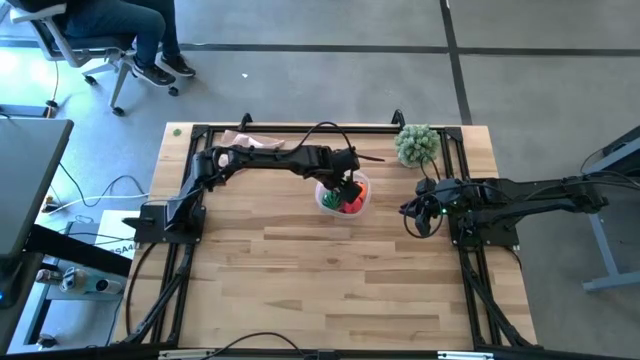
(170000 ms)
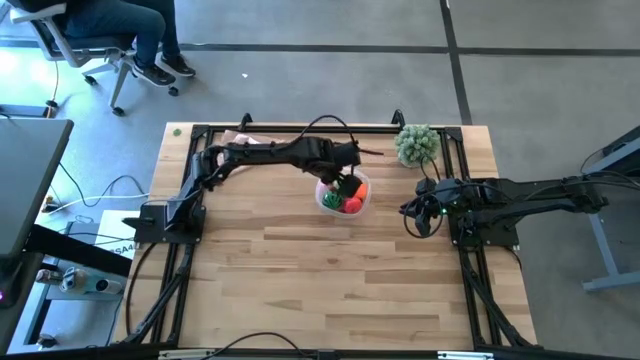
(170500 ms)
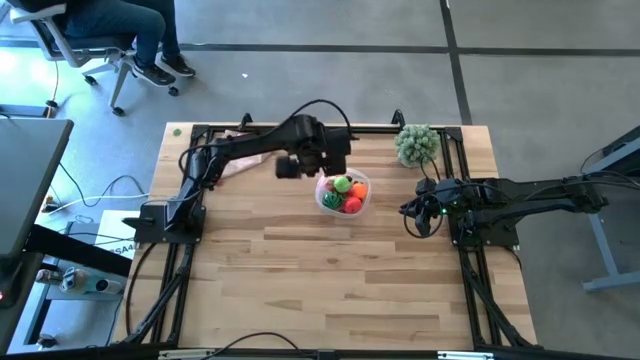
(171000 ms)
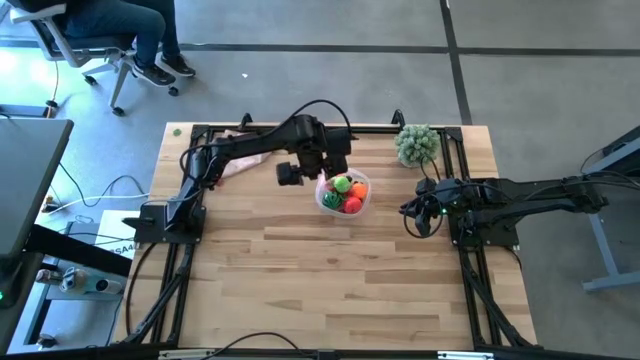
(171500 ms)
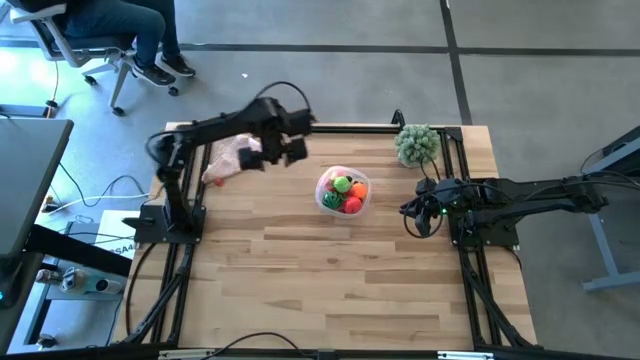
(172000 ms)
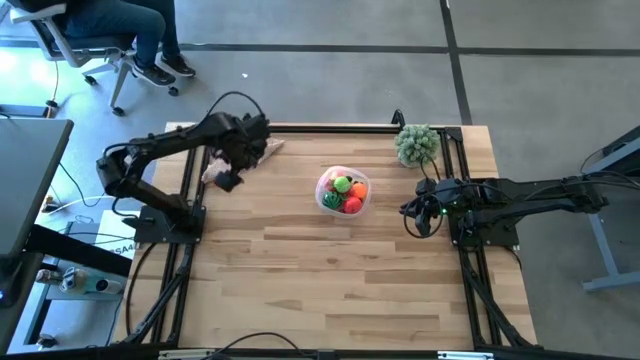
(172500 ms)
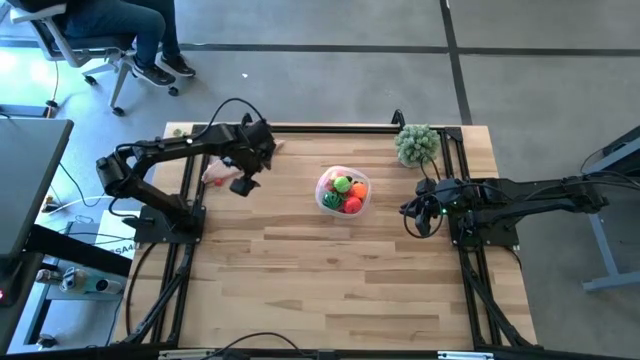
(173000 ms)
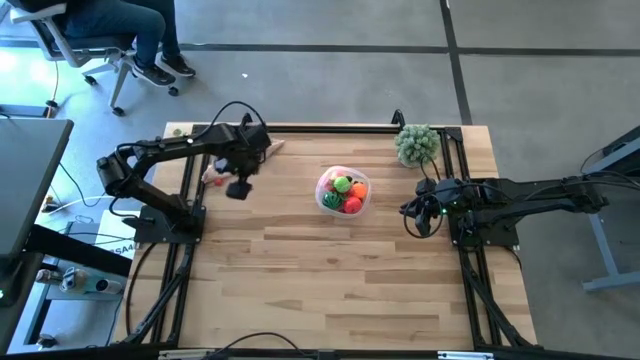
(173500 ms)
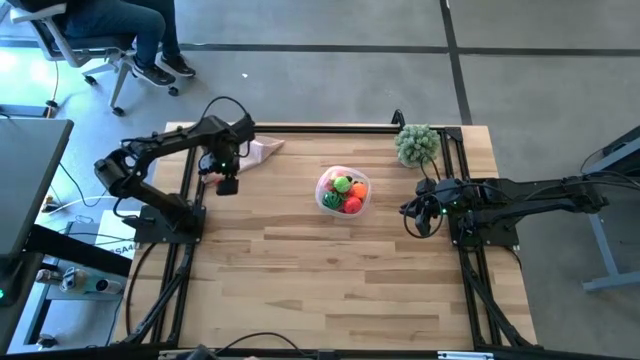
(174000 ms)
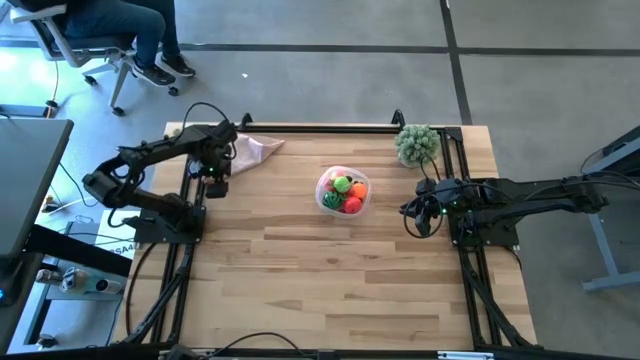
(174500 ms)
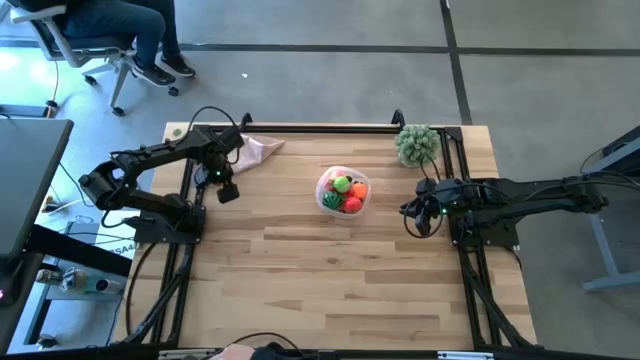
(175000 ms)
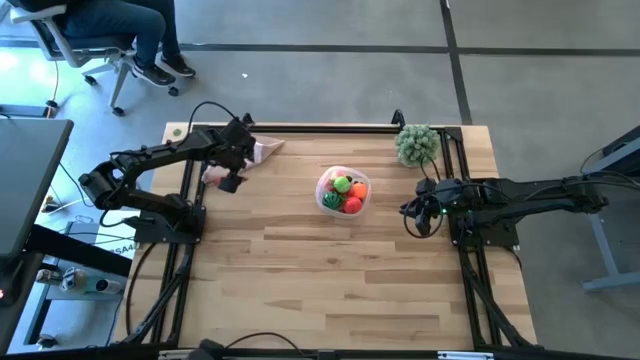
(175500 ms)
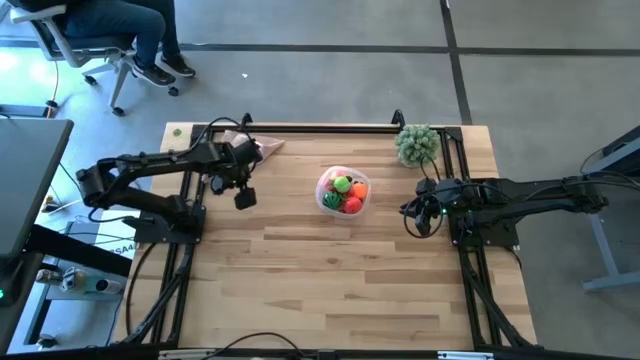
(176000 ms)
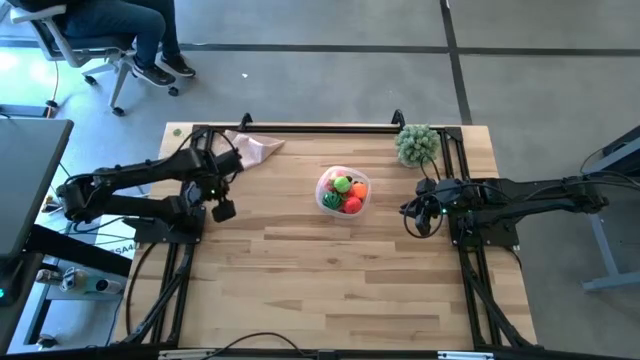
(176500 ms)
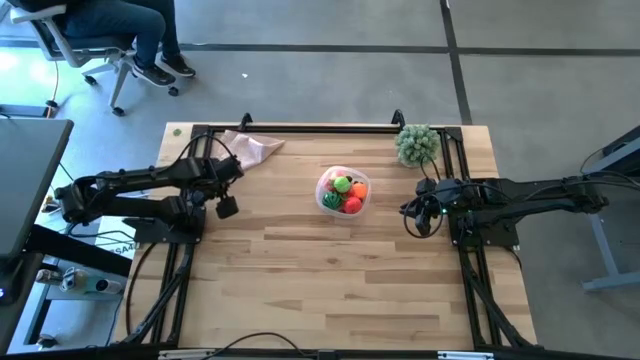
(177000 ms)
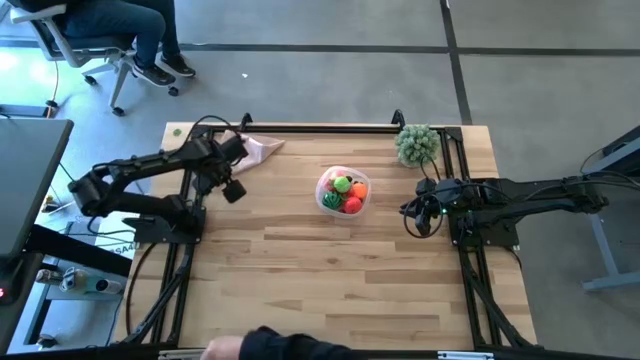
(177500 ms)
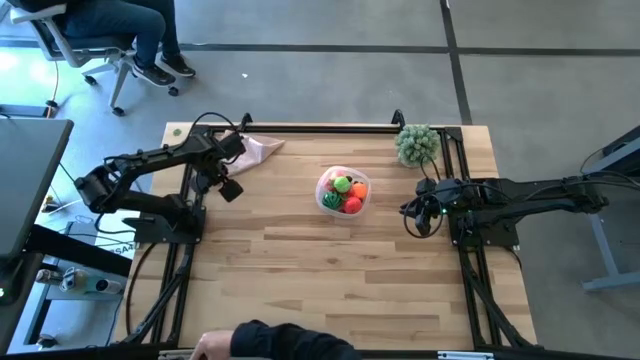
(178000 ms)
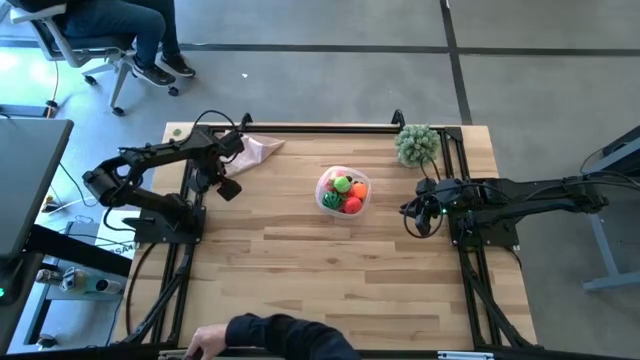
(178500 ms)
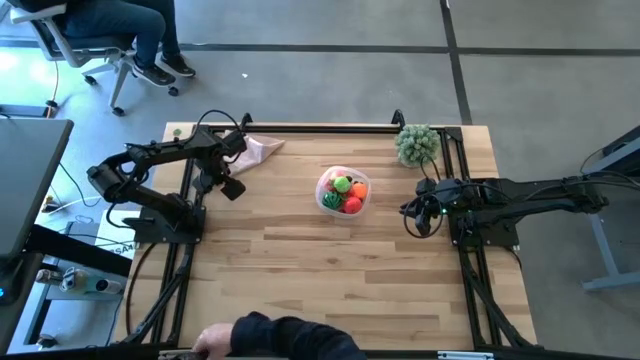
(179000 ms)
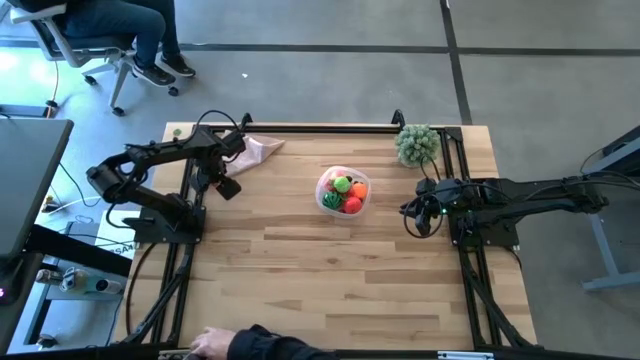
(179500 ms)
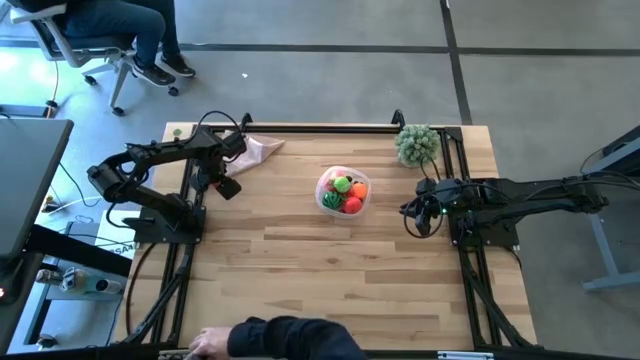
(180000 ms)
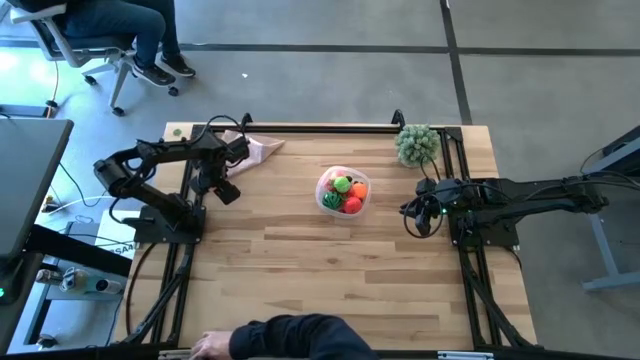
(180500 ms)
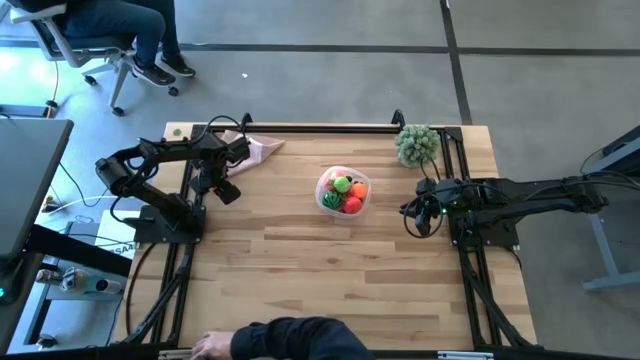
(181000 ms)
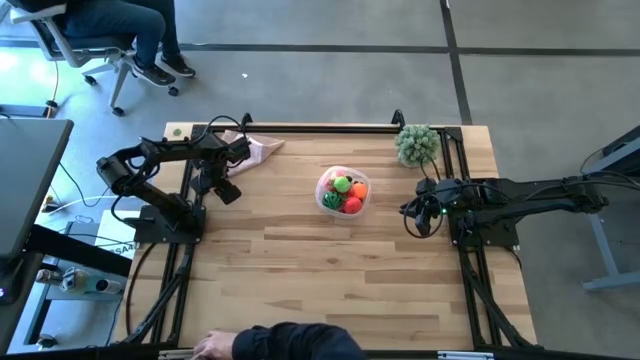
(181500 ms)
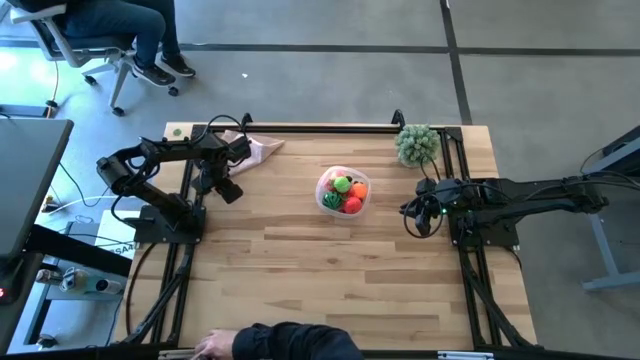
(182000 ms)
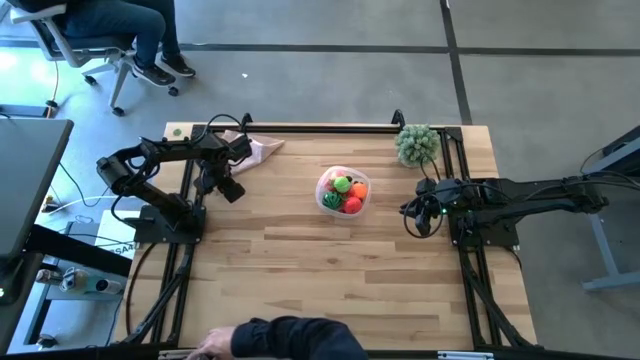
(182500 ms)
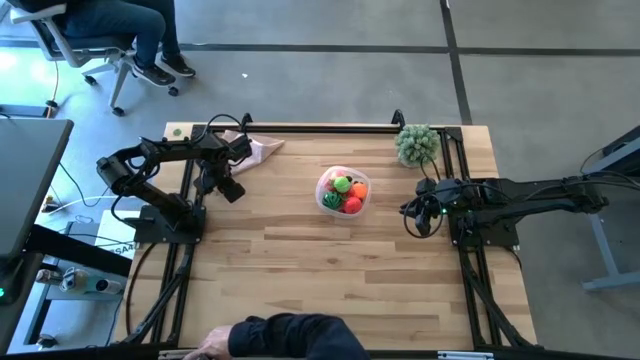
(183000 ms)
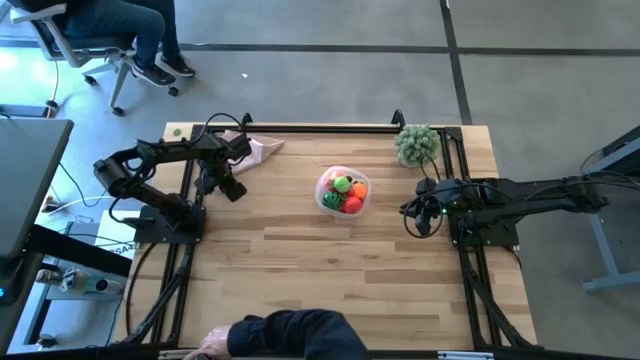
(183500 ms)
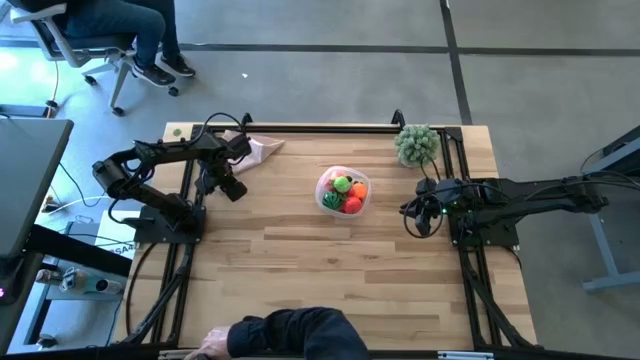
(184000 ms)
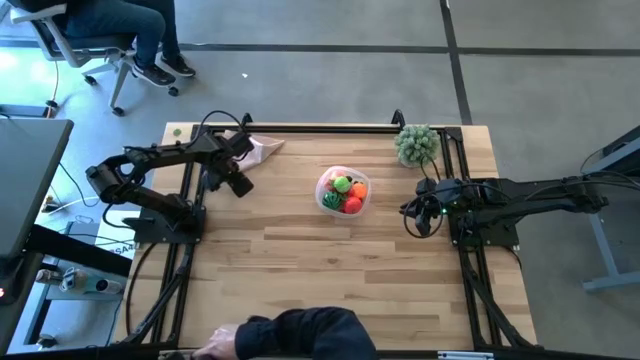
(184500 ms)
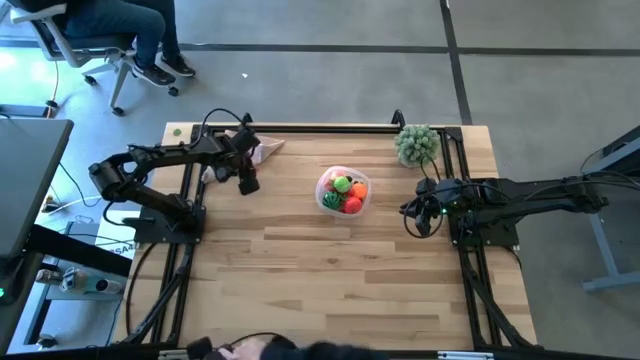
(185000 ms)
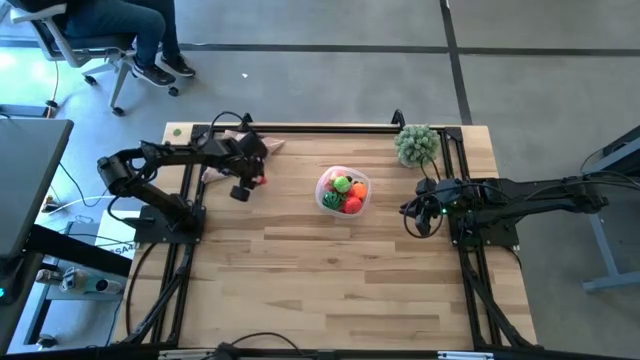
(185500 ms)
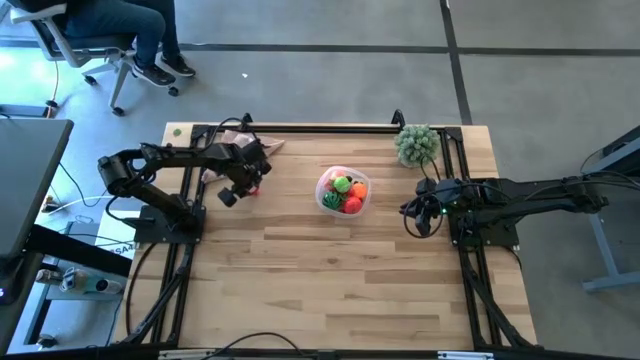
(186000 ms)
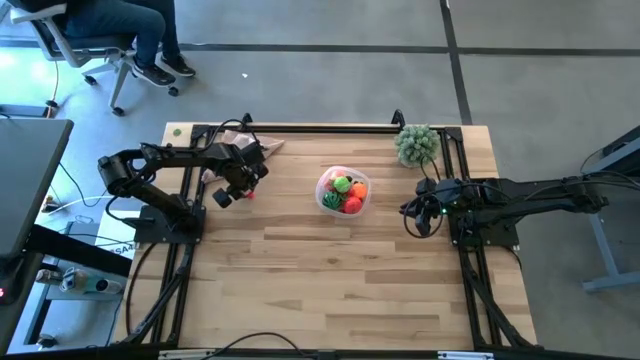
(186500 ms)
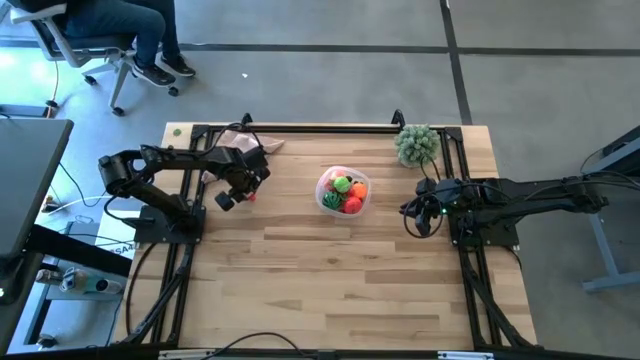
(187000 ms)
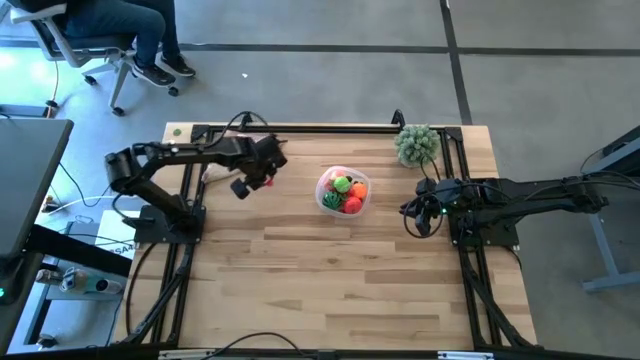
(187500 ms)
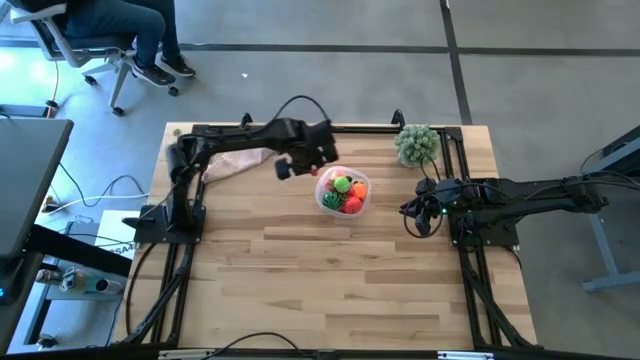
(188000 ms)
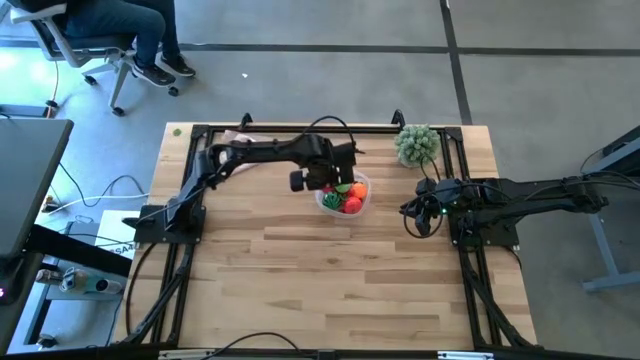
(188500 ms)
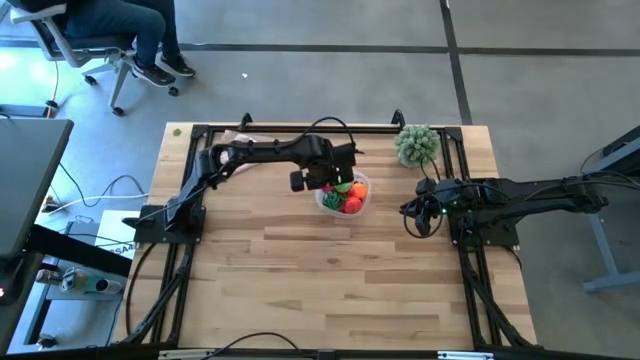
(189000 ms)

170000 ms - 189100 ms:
Task: Pick and placing Produce into tupperware
Put the cherry into the transparent bin

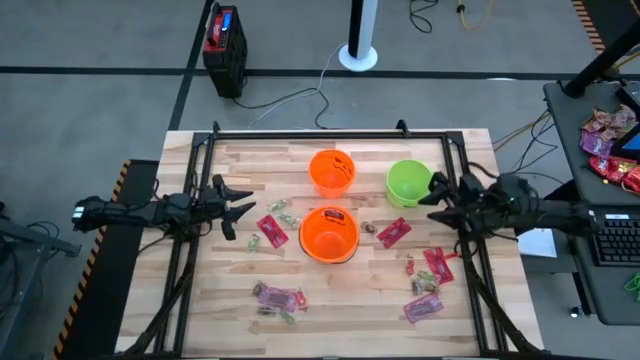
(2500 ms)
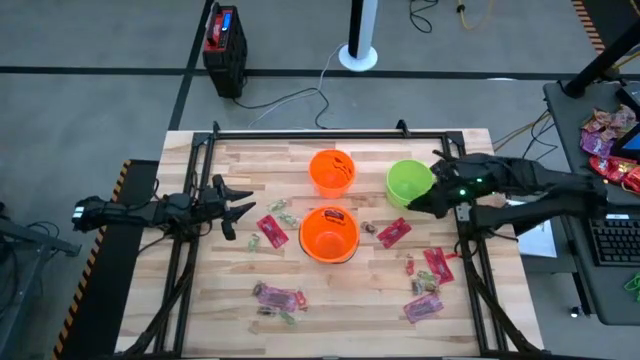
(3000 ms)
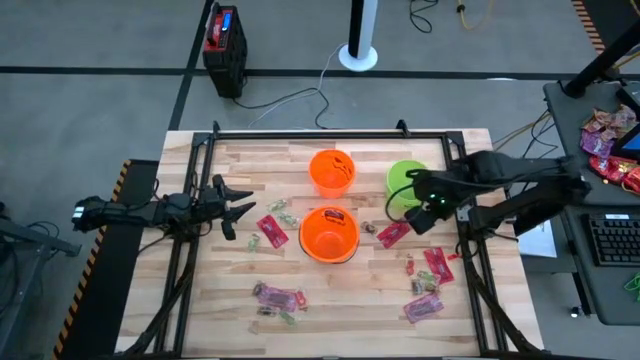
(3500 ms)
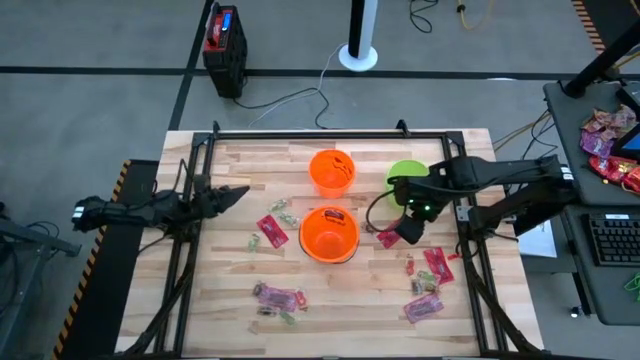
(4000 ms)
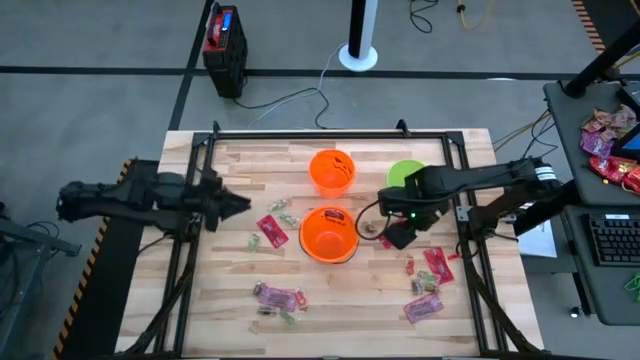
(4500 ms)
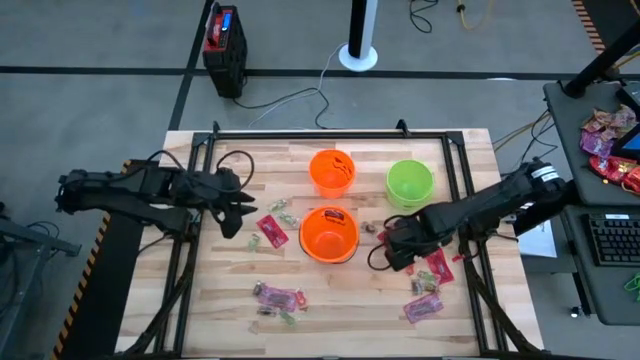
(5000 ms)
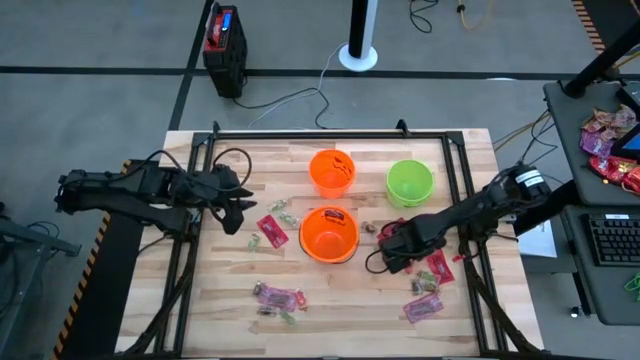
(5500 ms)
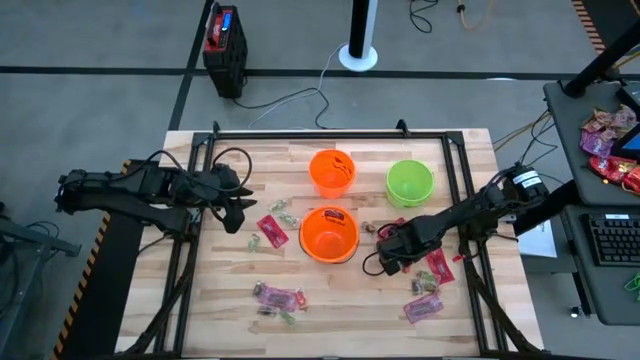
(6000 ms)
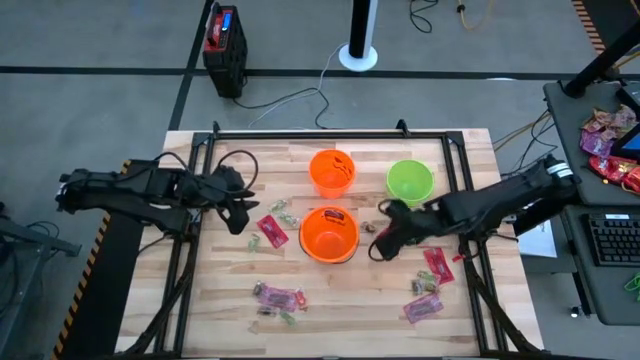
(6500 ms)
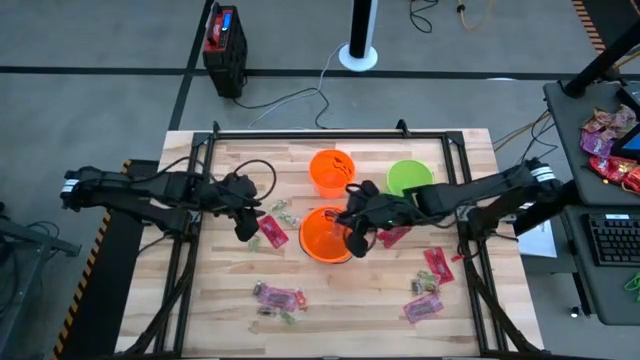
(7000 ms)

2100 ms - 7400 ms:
Task: Sort candy by brand, put in halloween buckets
Put the orange candy into the bottom orange bin
